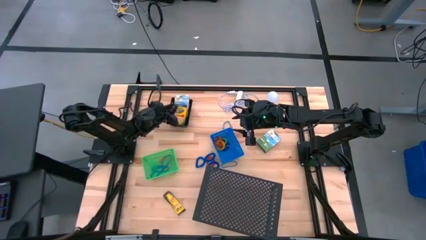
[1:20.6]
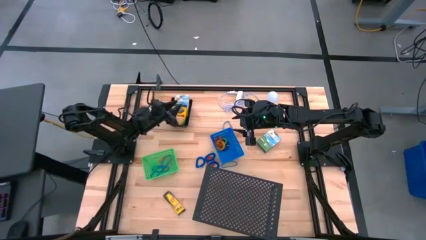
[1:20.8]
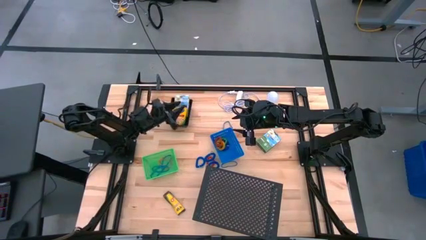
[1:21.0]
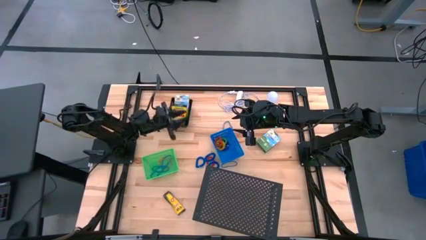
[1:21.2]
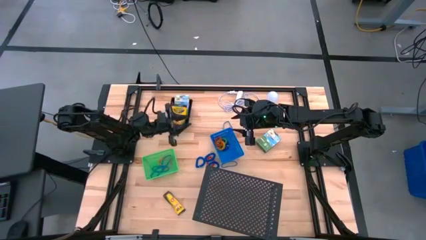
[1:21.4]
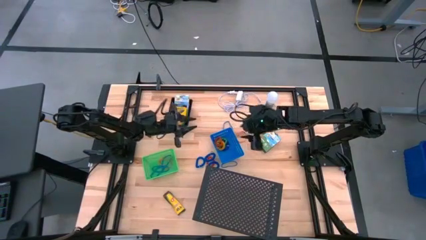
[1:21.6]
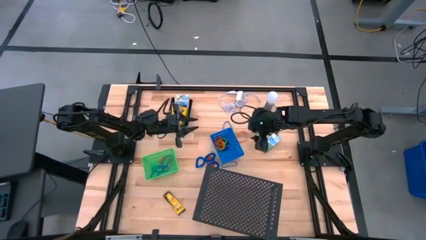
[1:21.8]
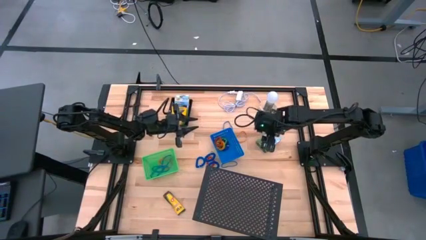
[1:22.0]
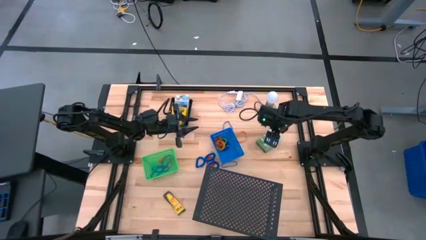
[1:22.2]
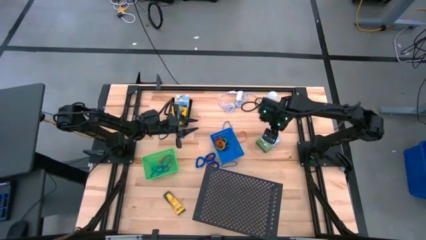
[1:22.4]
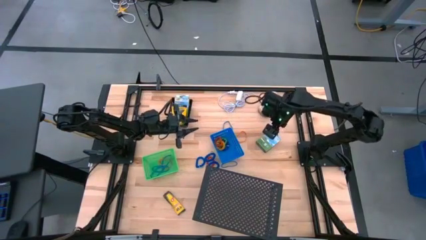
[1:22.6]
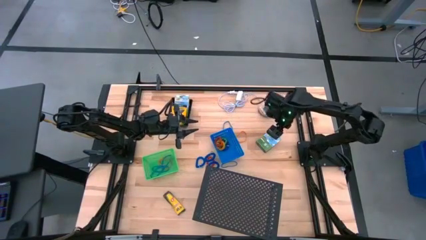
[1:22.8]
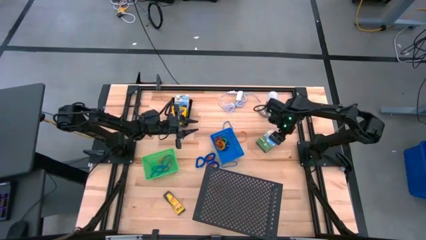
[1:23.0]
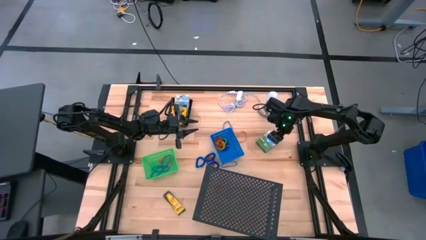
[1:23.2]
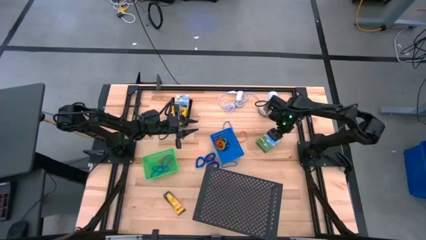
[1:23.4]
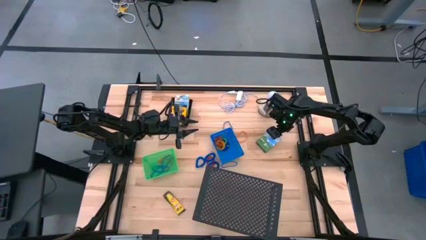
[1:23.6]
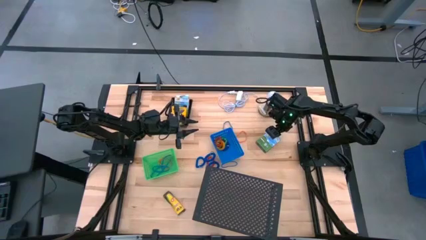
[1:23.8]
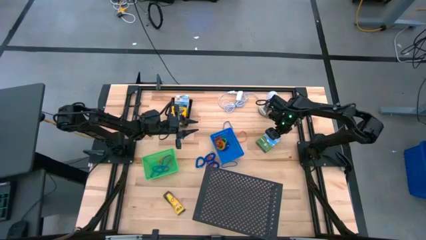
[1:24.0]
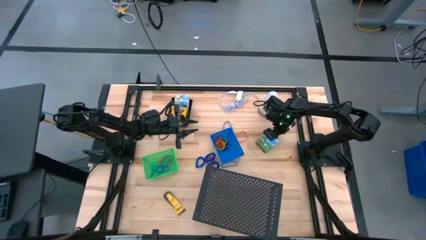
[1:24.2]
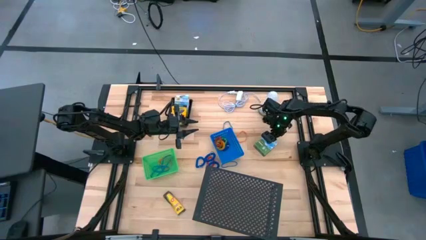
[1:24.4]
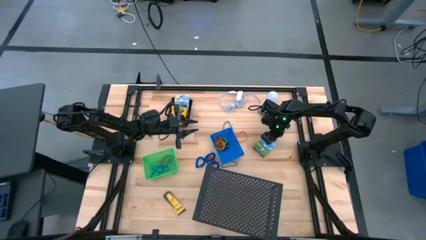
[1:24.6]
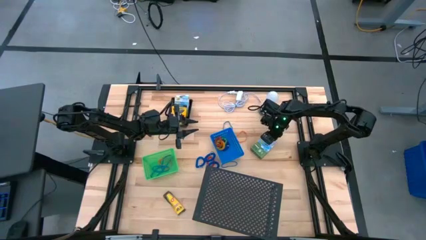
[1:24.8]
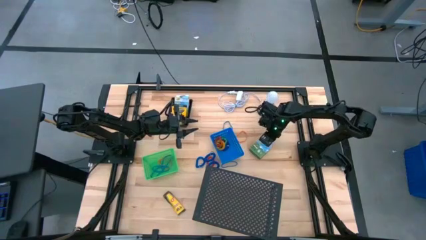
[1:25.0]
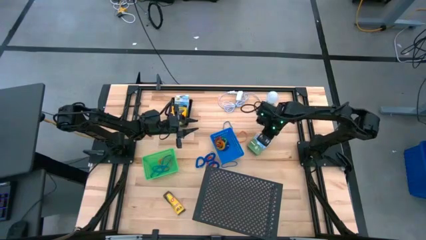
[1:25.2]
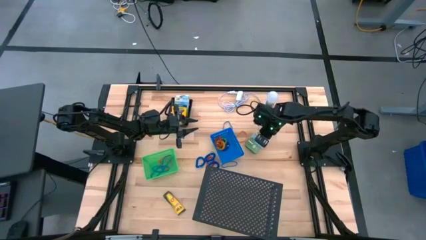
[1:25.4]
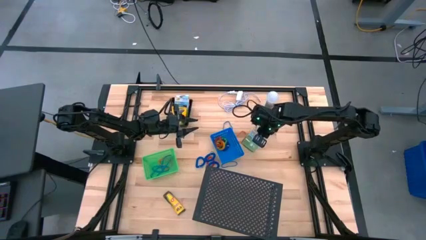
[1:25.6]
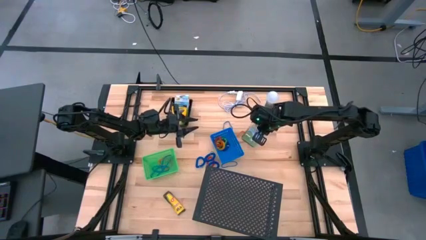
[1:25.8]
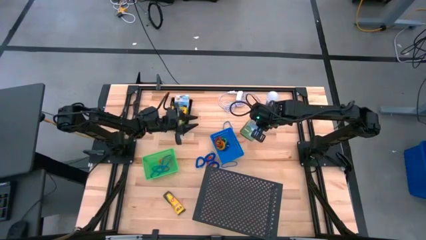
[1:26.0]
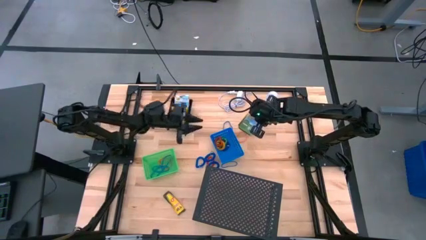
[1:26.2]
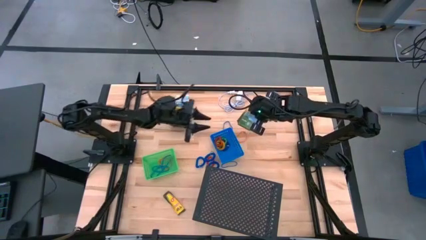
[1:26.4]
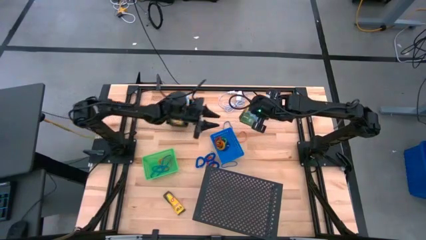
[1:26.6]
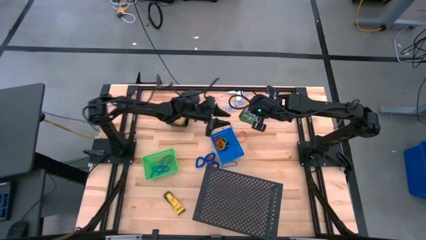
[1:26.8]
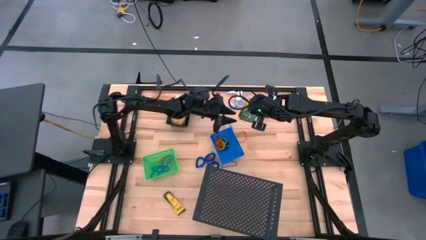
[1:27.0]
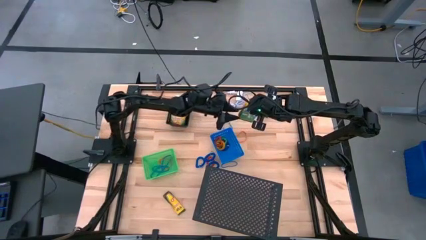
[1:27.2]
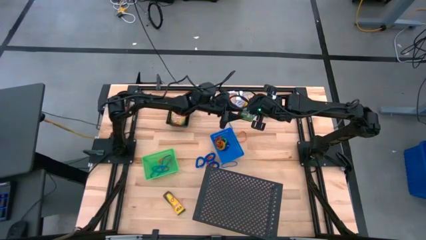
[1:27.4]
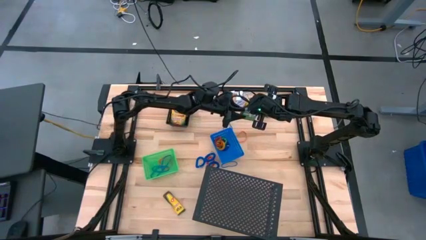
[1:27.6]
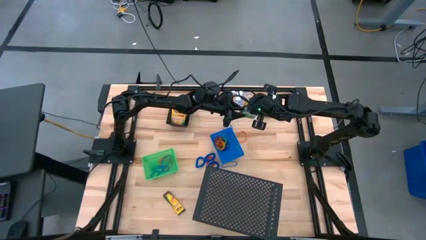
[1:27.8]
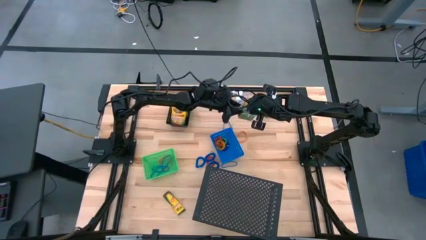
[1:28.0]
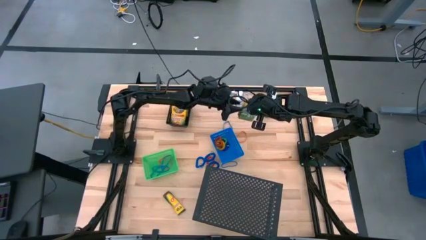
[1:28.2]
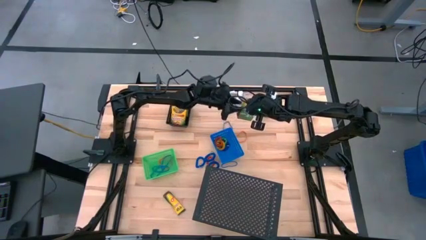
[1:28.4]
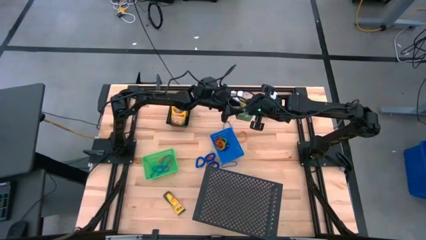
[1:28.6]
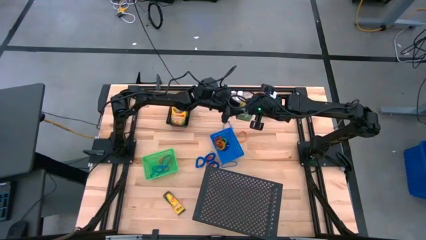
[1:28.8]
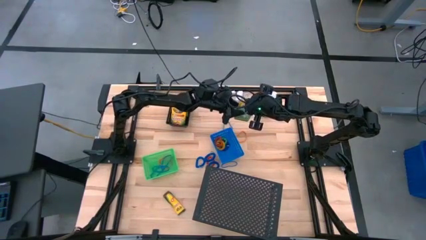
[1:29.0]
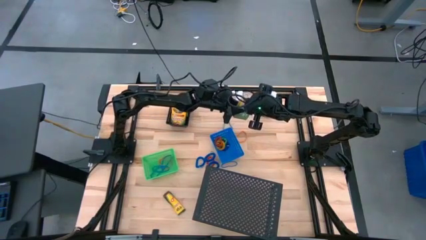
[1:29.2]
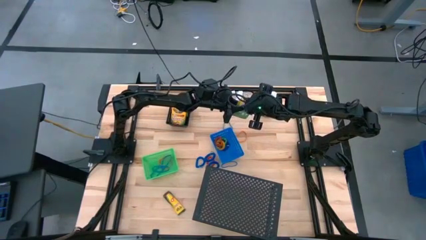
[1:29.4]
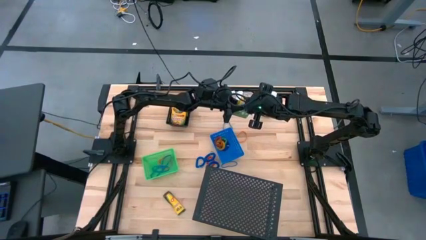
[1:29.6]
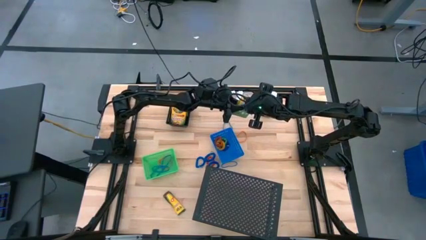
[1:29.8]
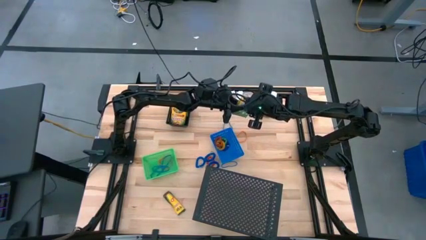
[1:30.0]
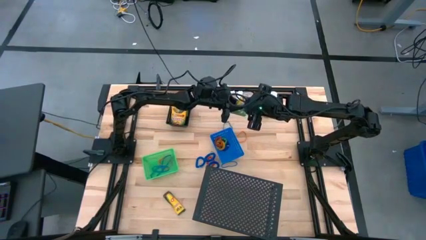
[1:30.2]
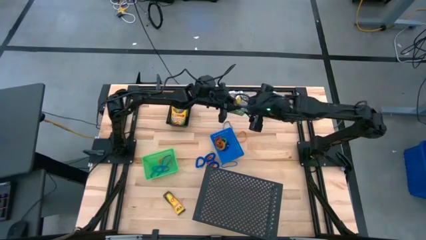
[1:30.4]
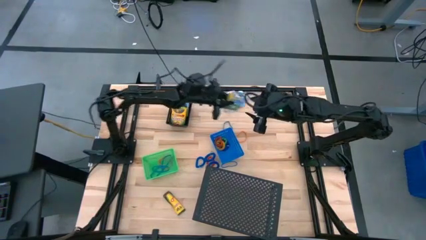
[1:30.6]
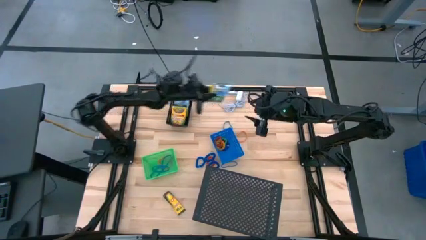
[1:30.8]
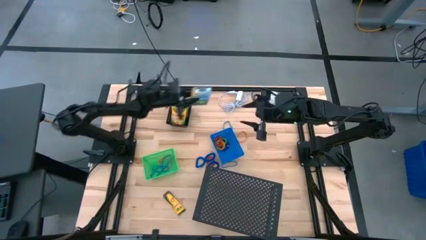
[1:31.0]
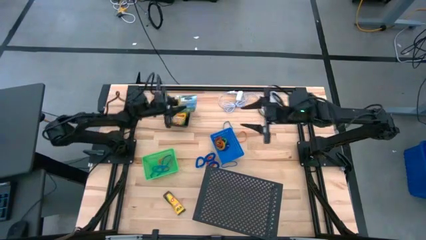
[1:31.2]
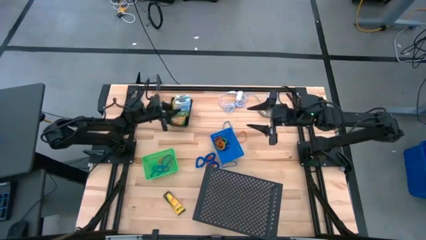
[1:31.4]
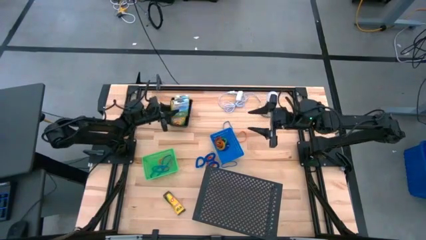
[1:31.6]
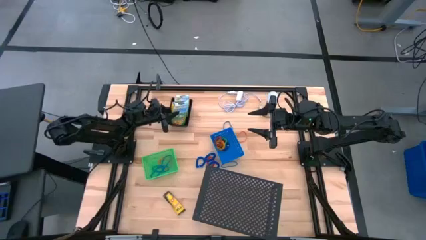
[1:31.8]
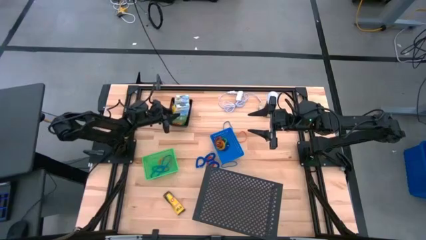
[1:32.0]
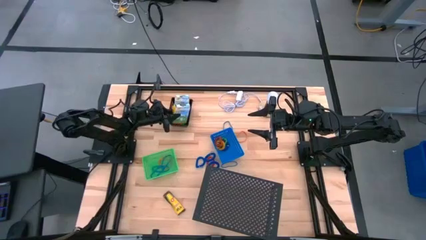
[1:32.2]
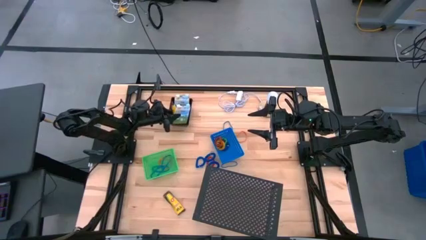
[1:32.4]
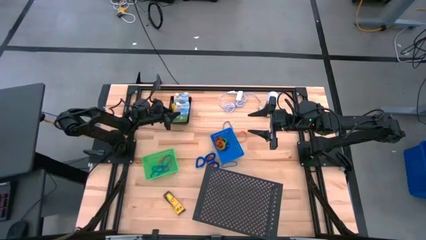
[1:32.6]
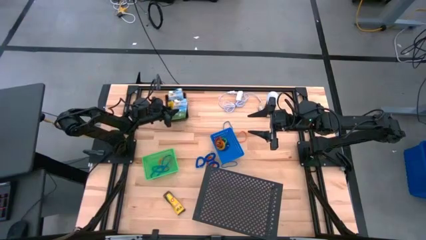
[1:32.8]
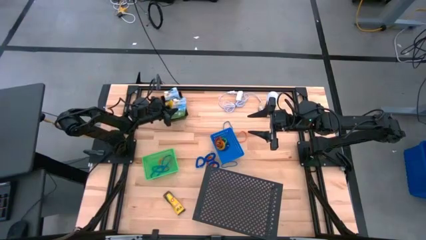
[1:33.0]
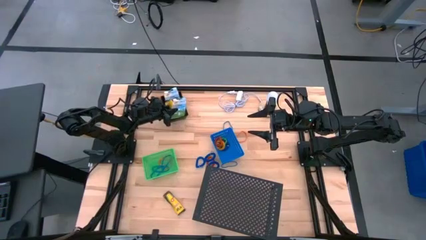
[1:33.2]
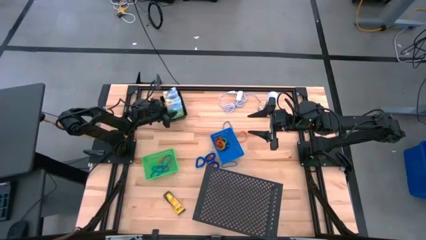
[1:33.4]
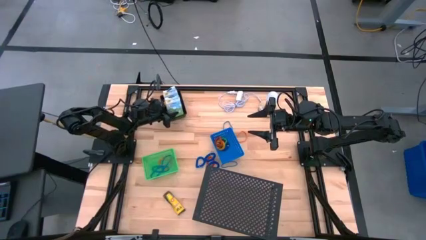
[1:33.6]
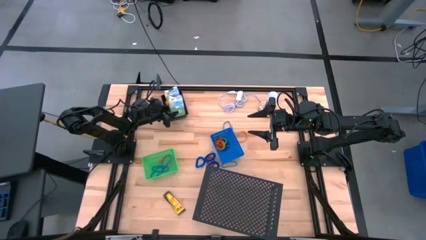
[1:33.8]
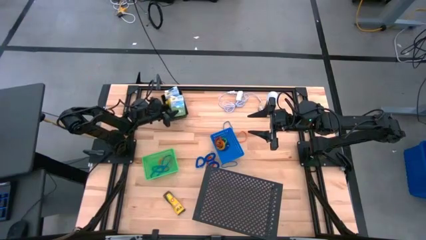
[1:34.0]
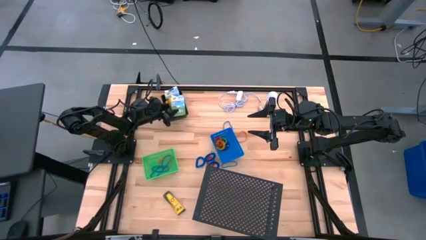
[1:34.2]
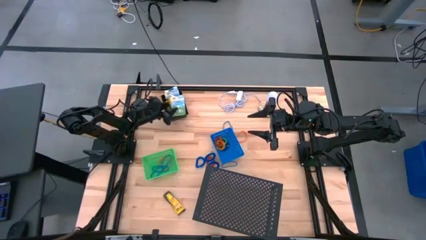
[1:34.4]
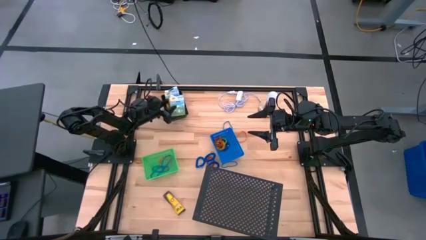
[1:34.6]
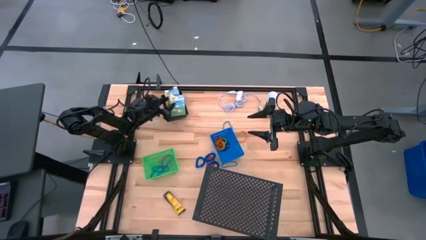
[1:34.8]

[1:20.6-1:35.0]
Task: Pick & Place Office Desk Supplies
Put the green crayon box into the black bin
